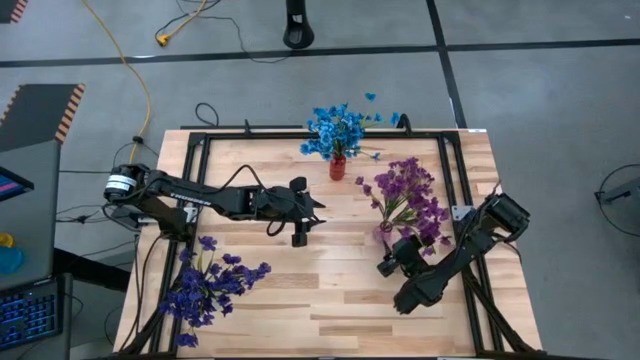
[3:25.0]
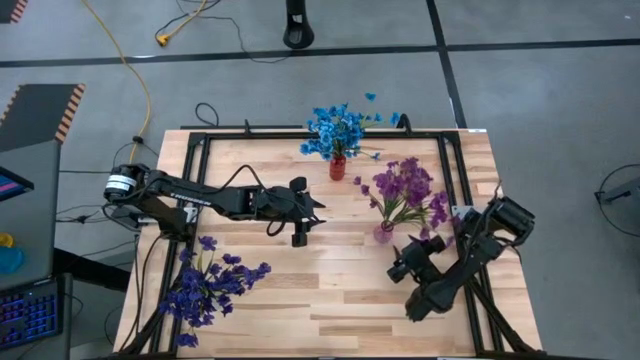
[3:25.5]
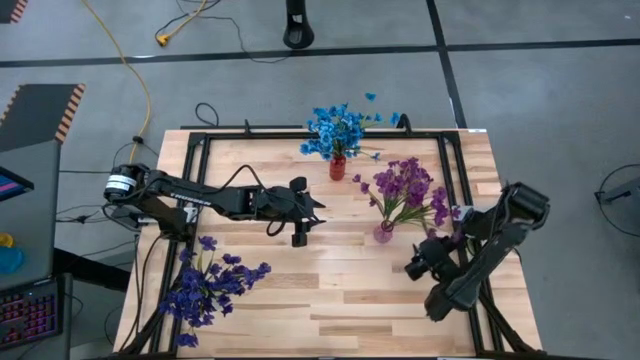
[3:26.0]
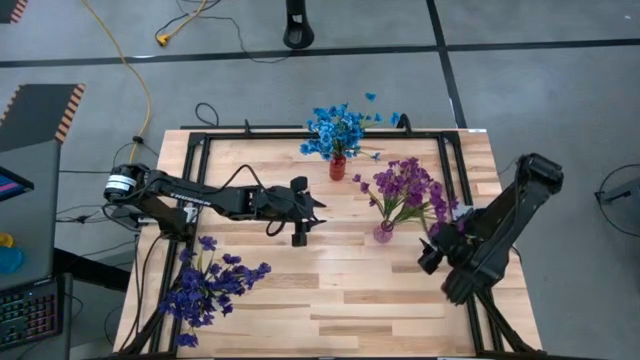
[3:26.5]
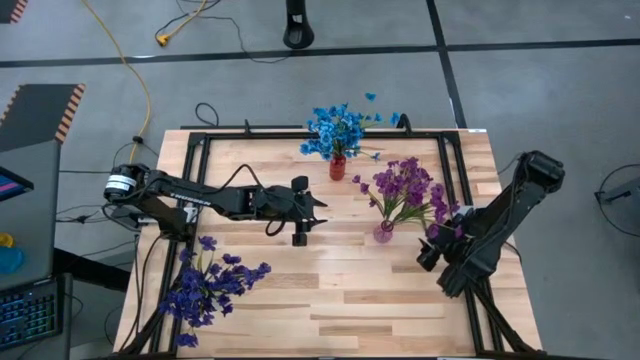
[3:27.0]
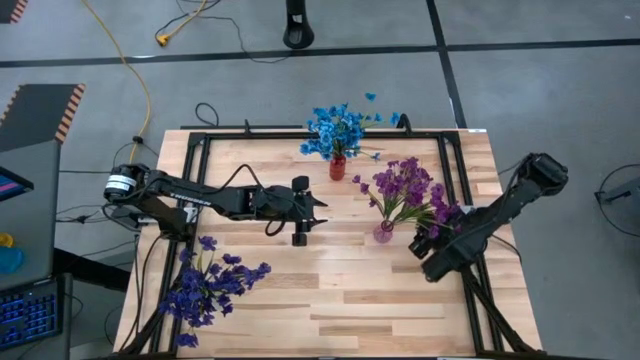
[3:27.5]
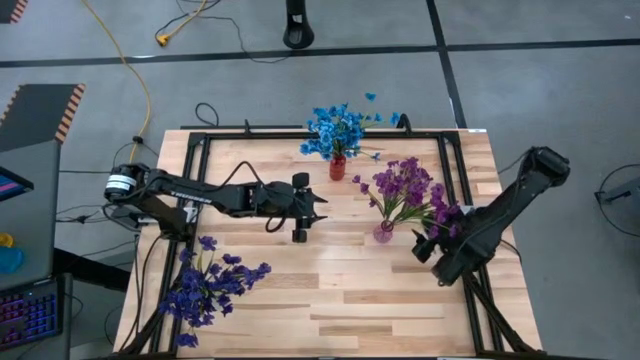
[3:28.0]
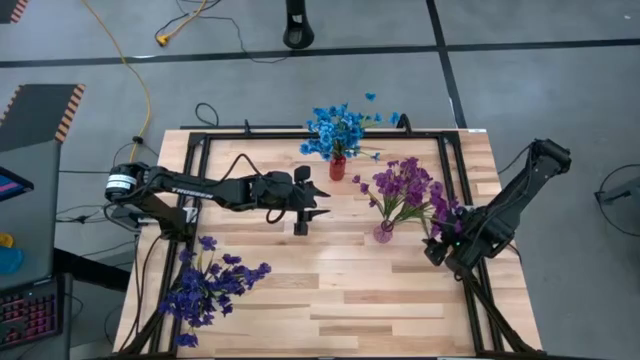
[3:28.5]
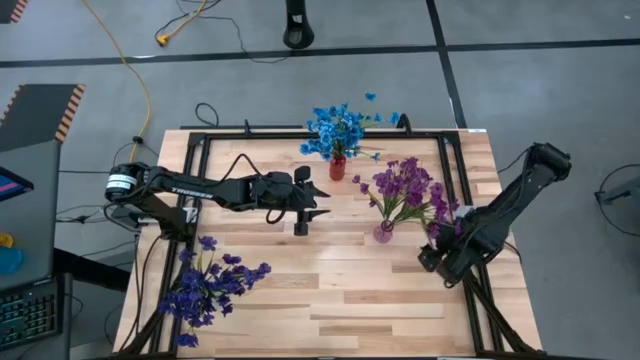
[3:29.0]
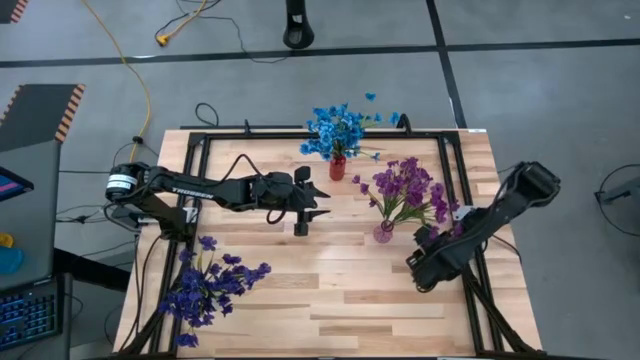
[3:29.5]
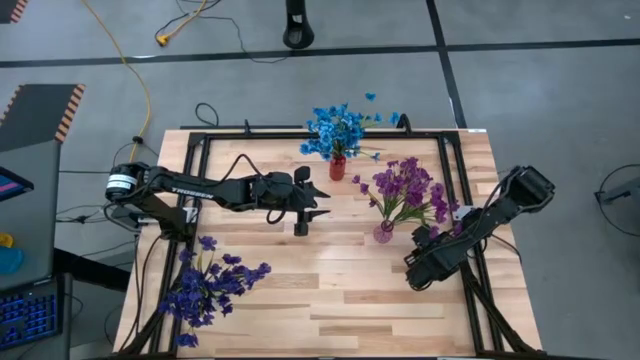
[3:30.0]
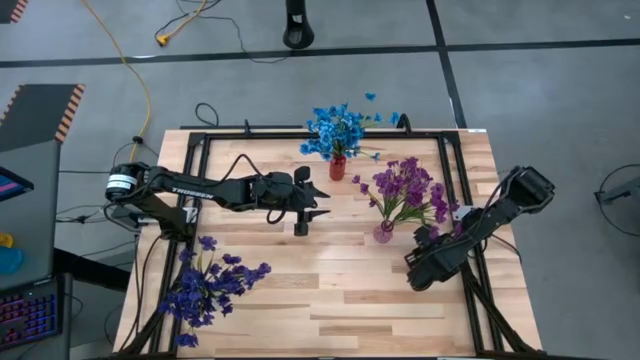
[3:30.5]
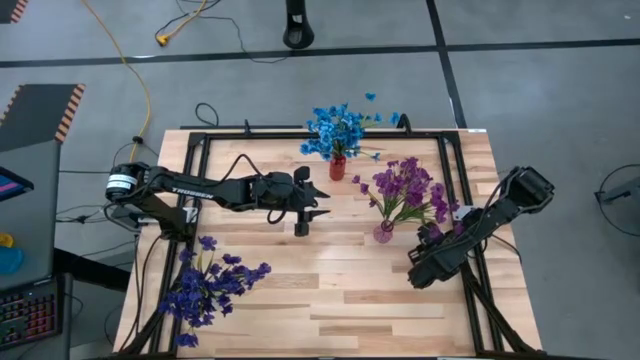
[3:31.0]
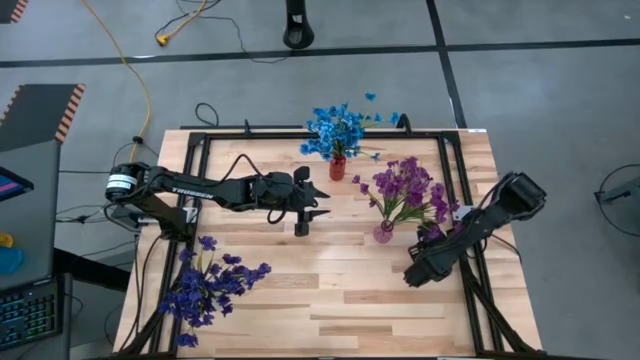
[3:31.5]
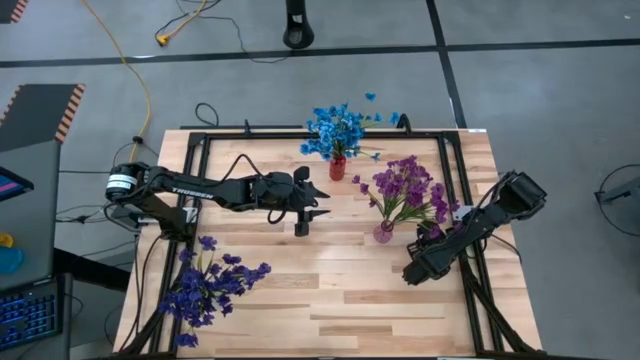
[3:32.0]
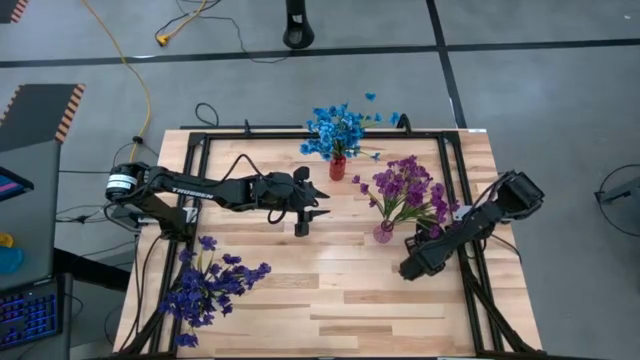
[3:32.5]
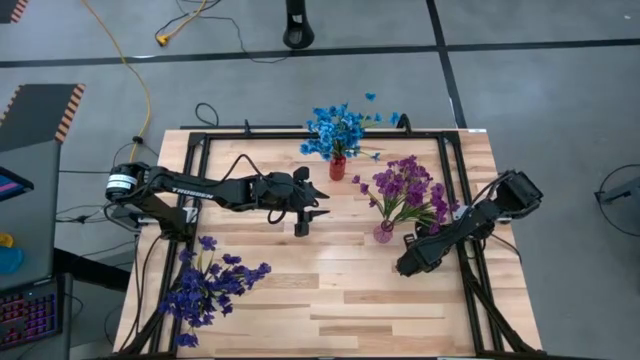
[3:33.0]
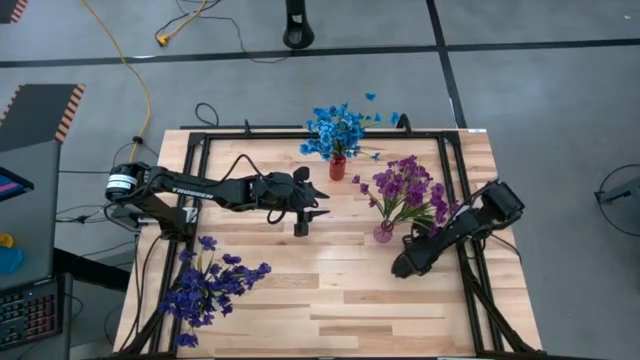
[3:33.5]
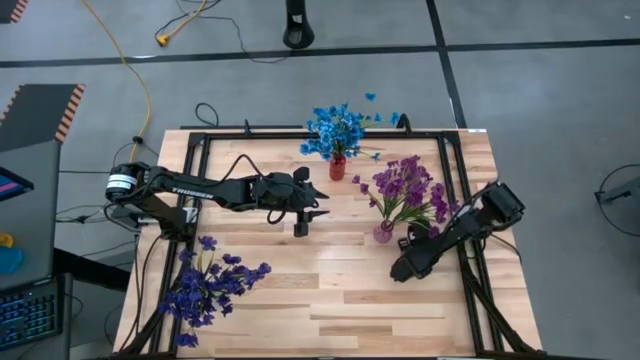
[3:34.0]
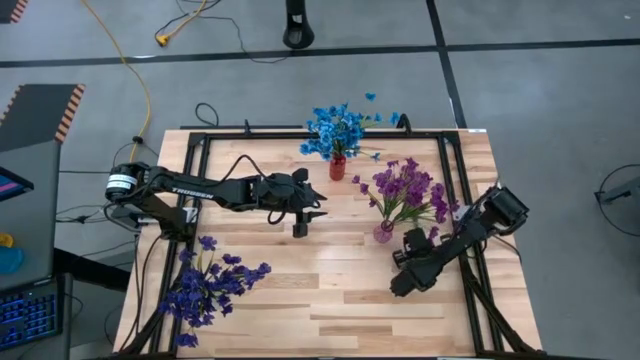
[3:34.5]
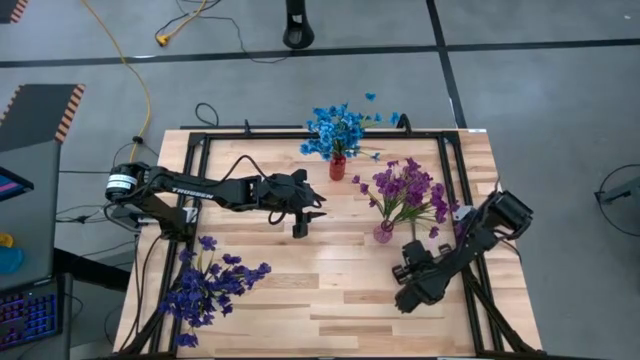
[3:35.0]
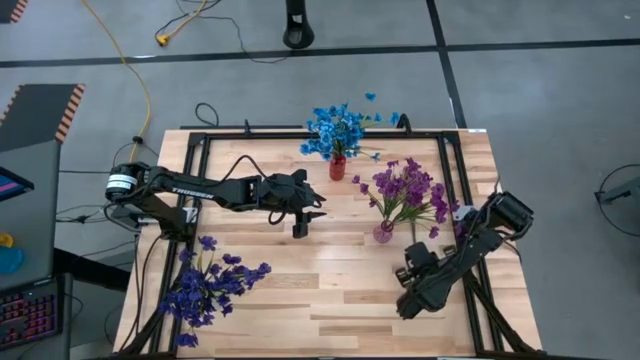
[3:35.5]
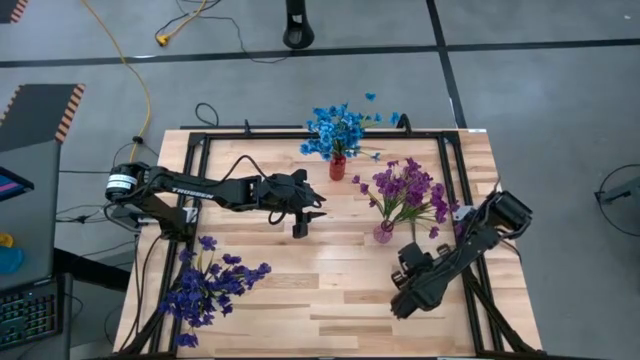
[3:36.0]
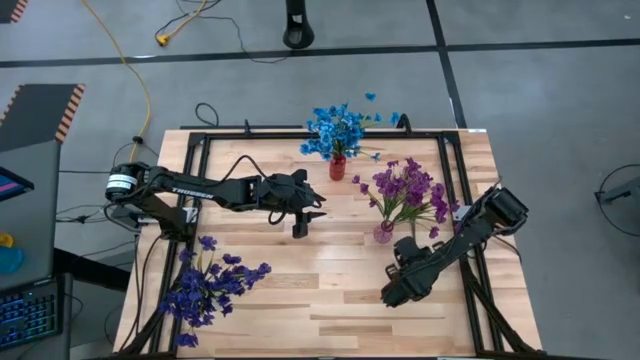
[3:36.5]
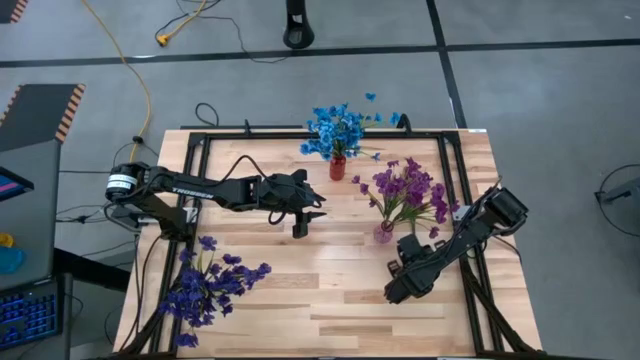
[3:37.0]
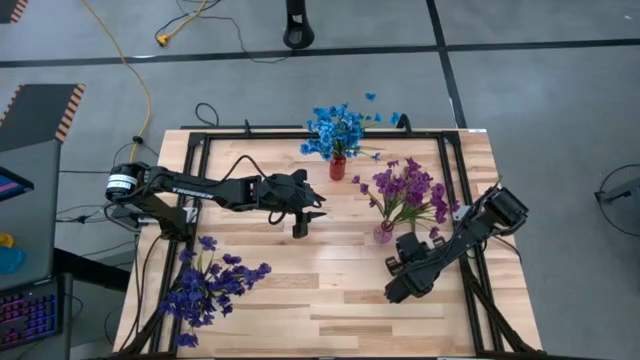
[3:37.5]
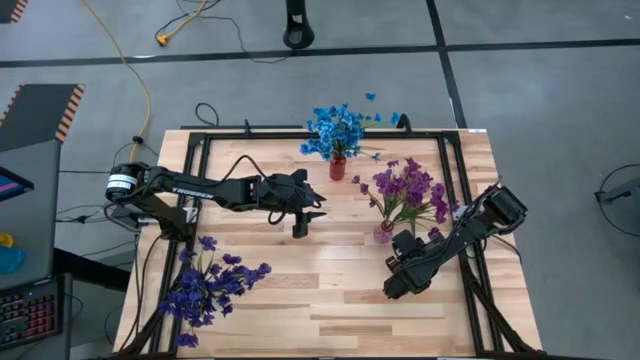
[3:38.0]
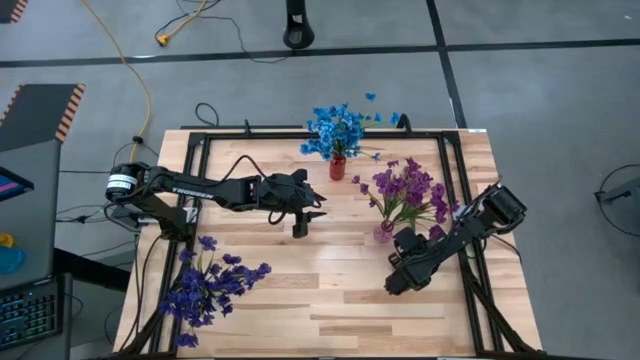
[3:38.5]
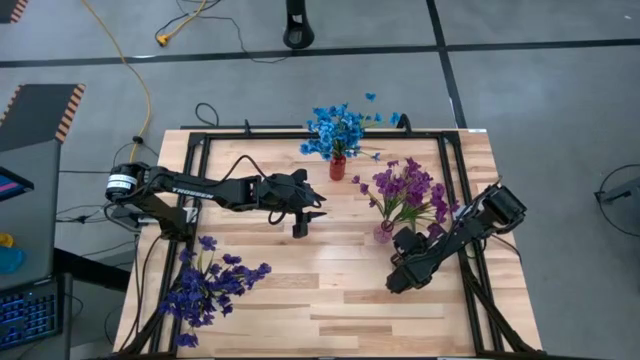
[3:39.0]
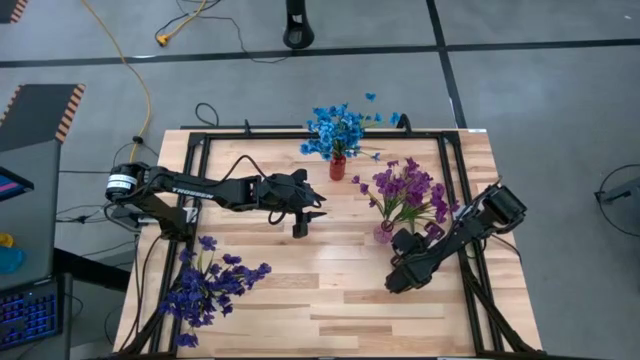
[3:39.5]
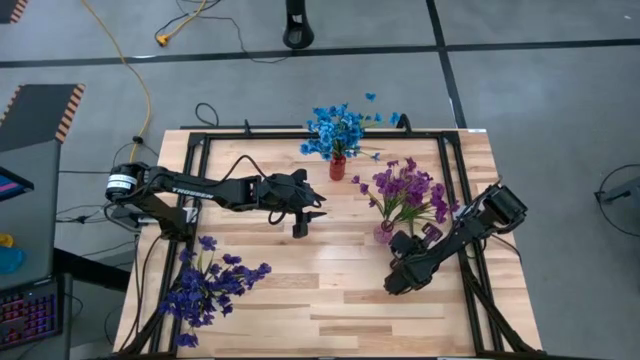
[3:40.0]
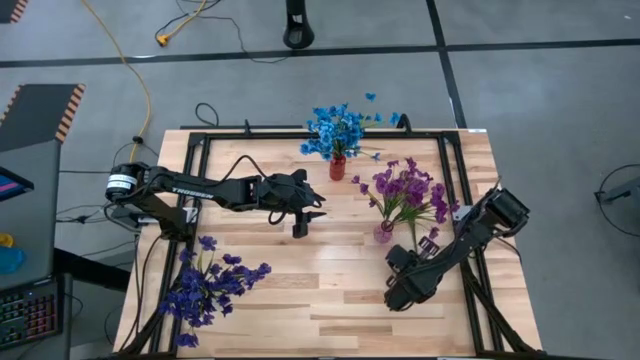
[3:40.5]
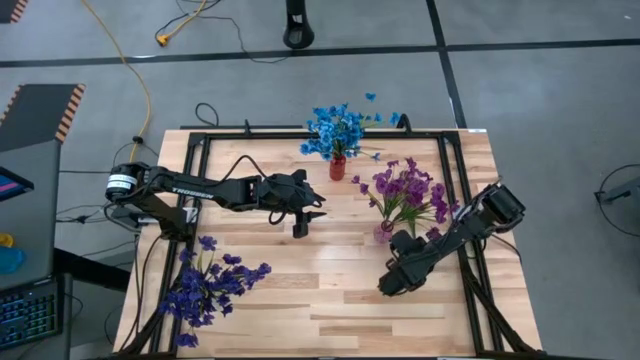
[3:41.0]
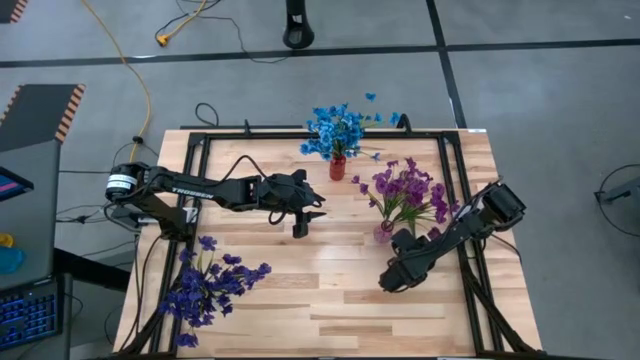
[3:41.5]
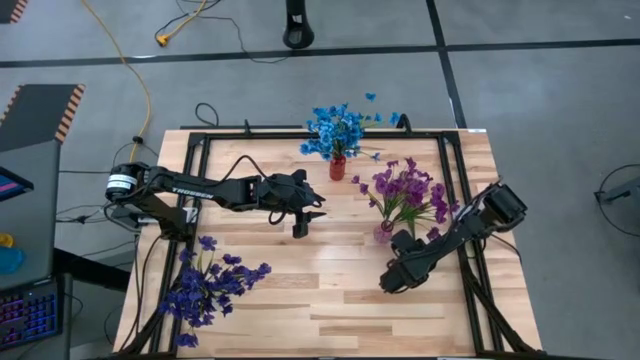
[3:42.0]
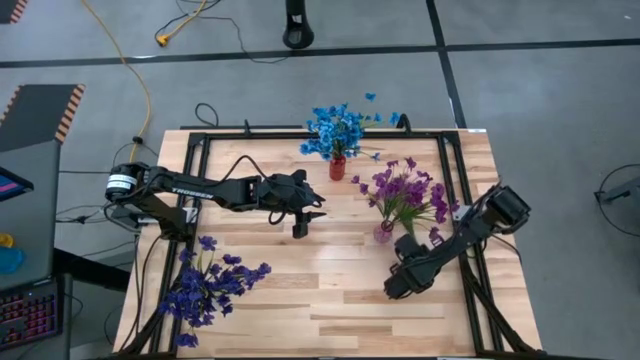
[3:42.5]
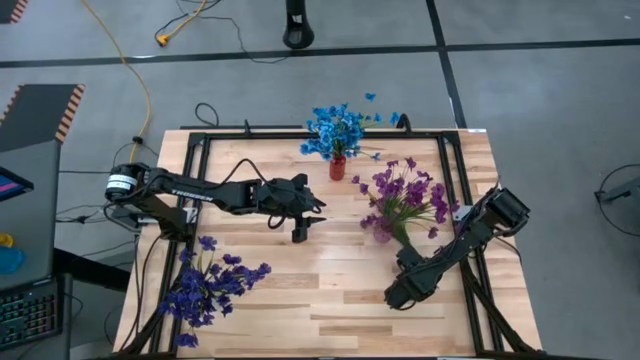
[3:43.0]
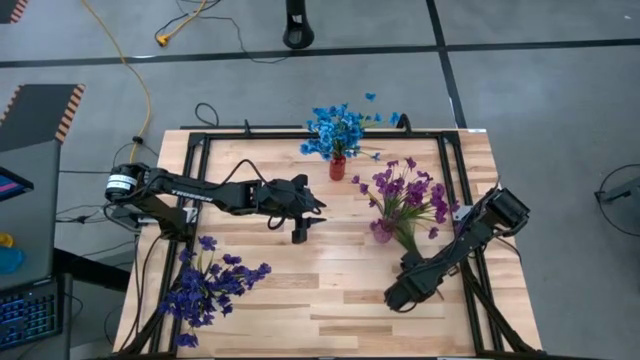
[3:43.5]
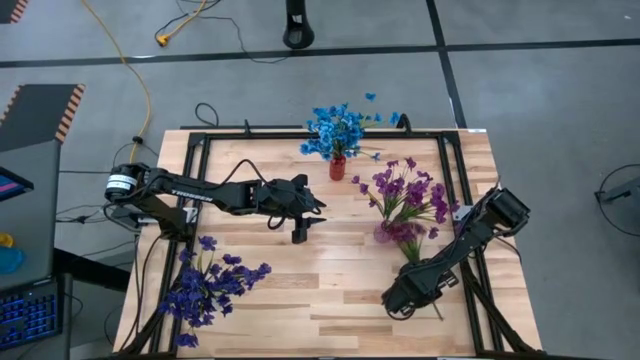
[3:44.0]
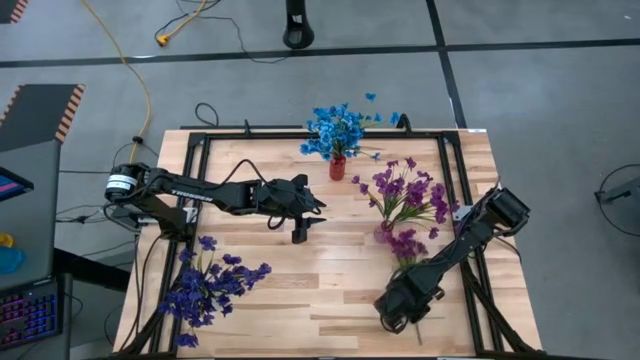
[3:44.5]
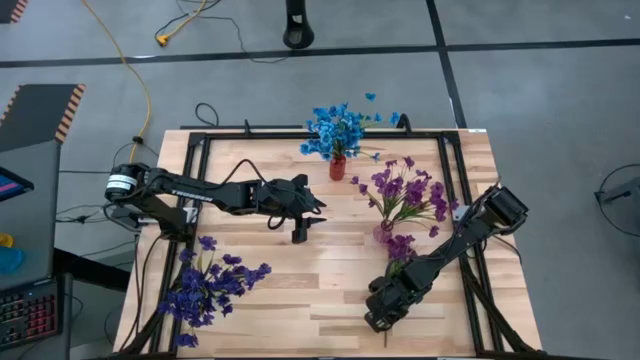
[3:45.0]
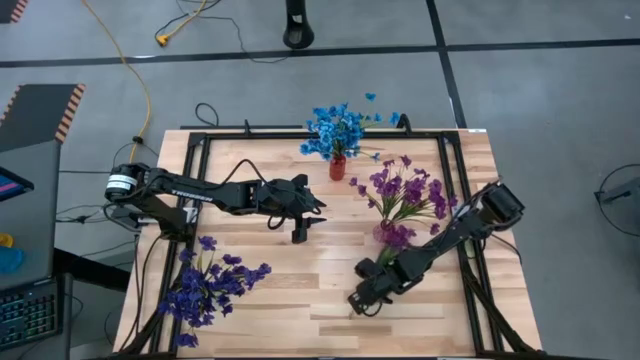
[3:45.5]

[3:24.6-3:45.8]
Task: Sort flowers into vase by color
Put the violet flowers into the violet vase
